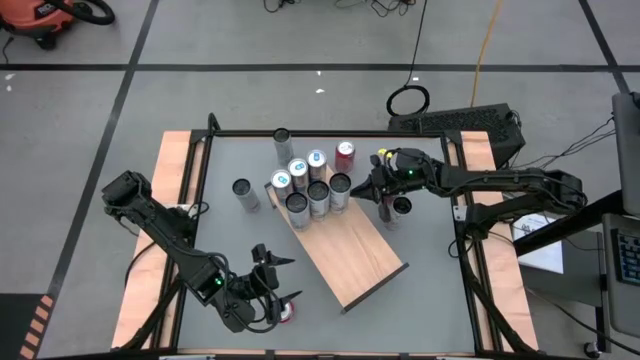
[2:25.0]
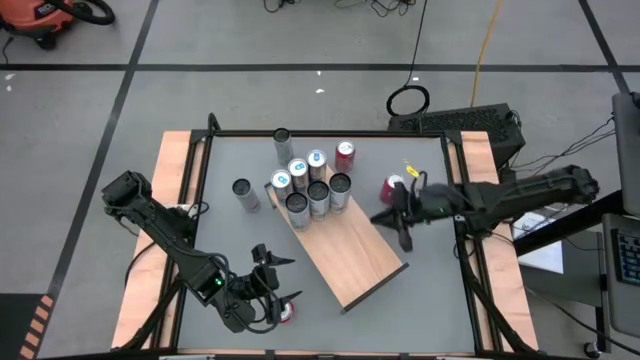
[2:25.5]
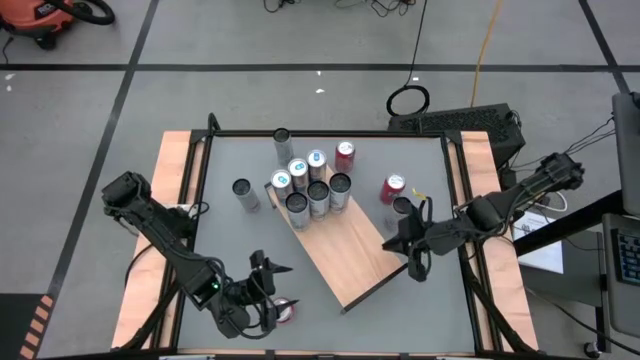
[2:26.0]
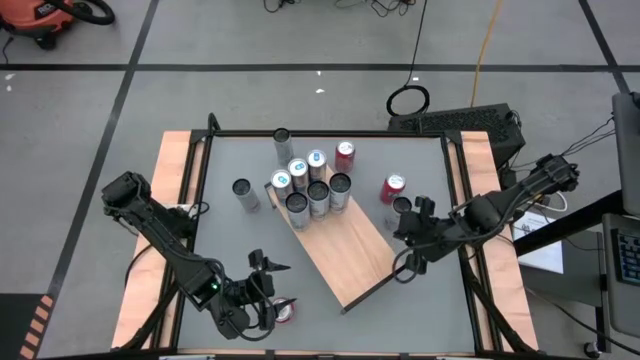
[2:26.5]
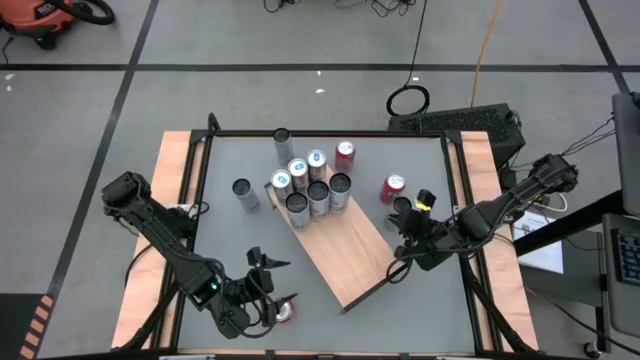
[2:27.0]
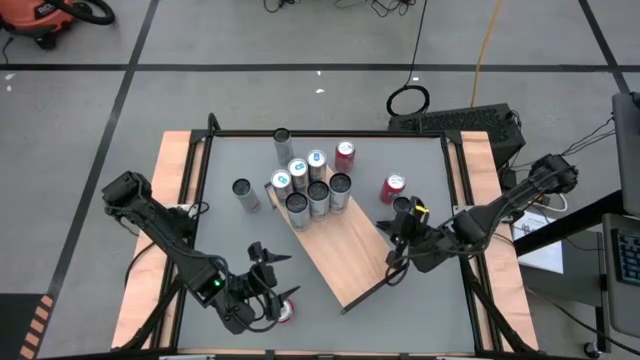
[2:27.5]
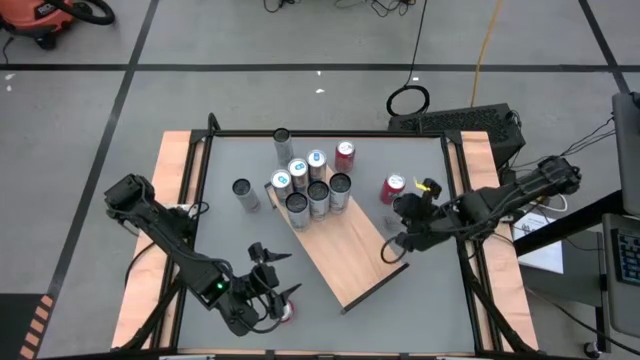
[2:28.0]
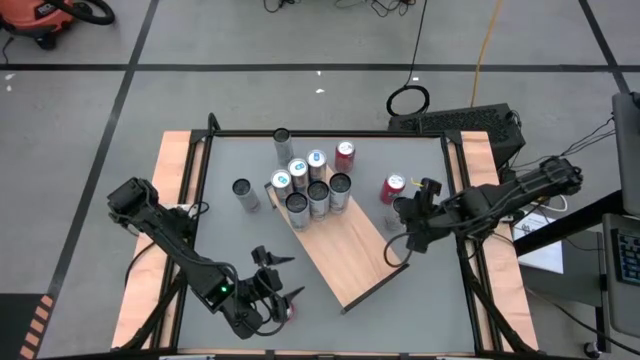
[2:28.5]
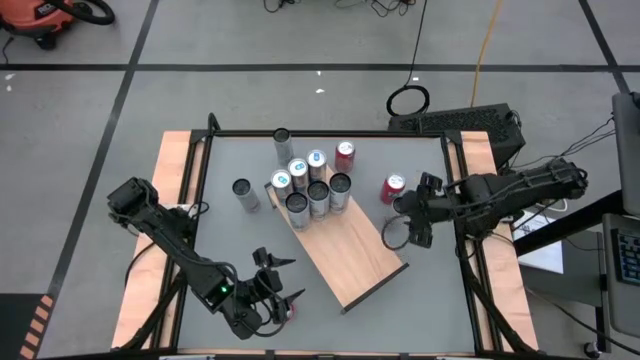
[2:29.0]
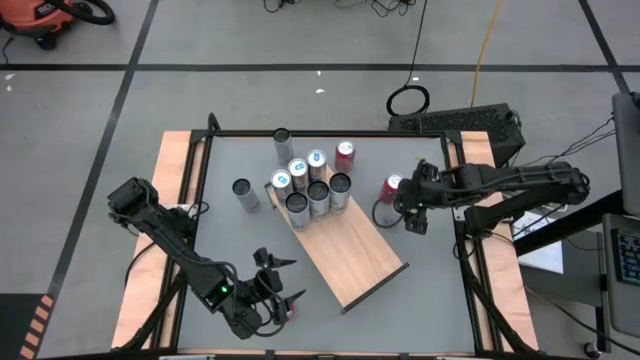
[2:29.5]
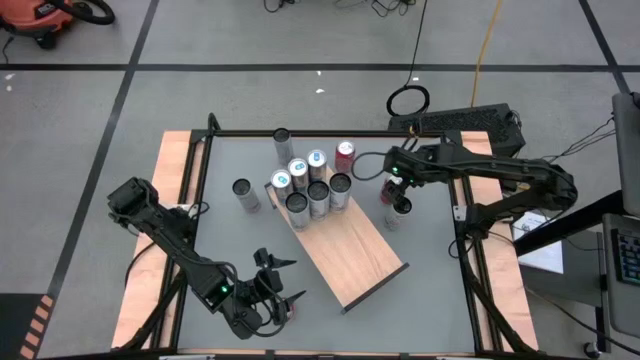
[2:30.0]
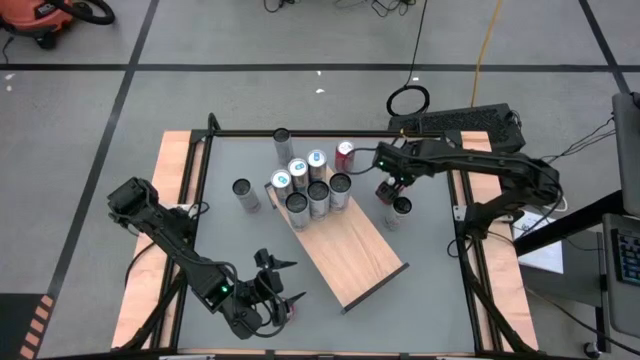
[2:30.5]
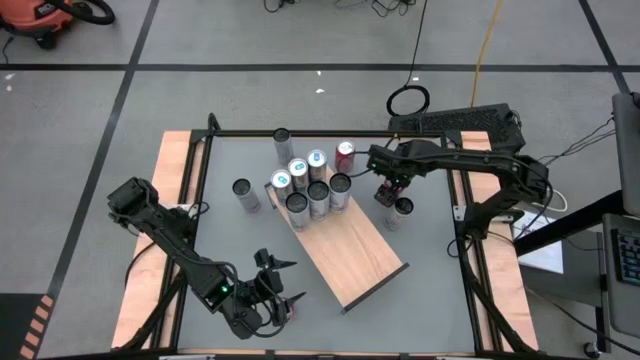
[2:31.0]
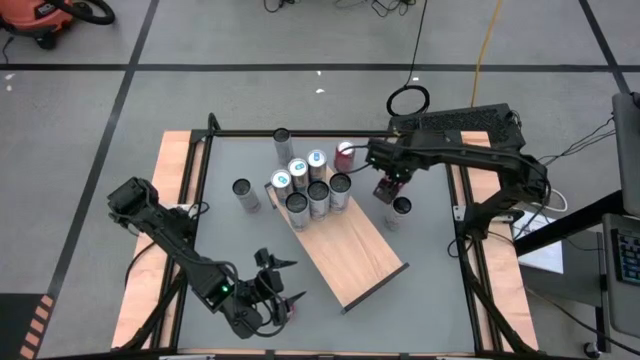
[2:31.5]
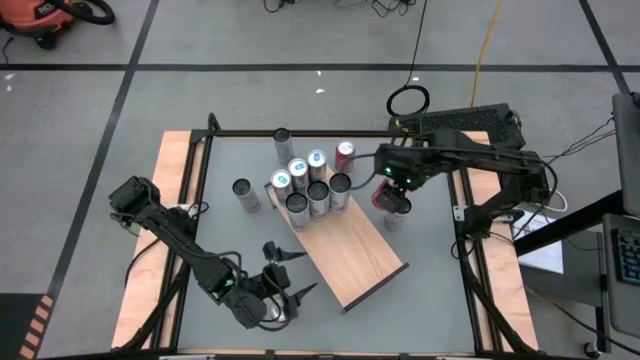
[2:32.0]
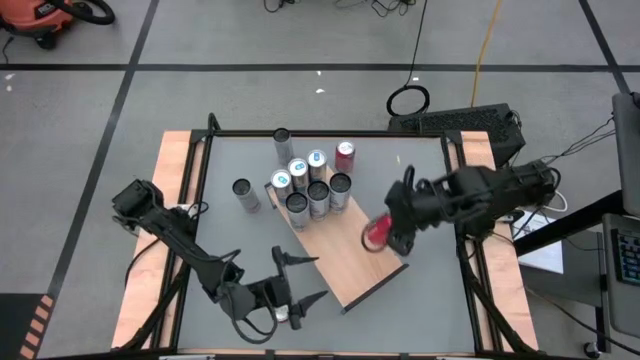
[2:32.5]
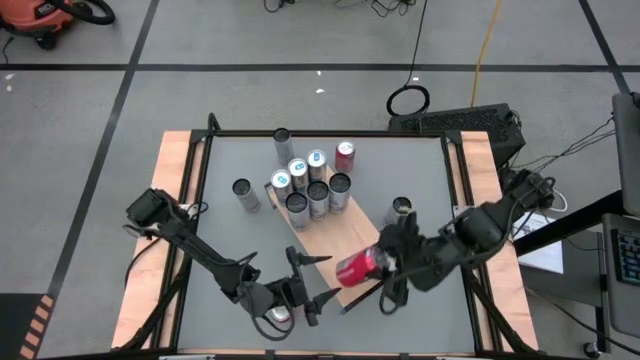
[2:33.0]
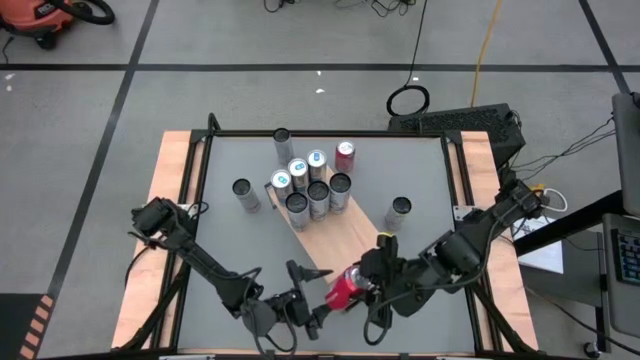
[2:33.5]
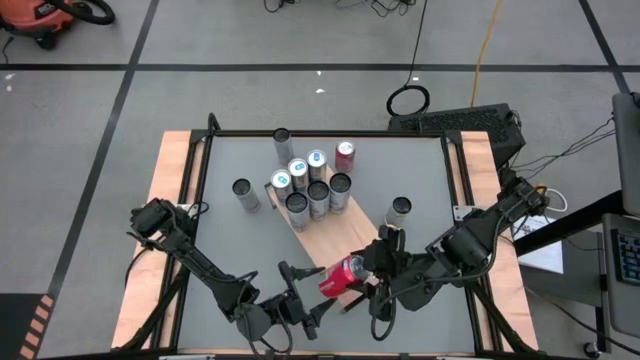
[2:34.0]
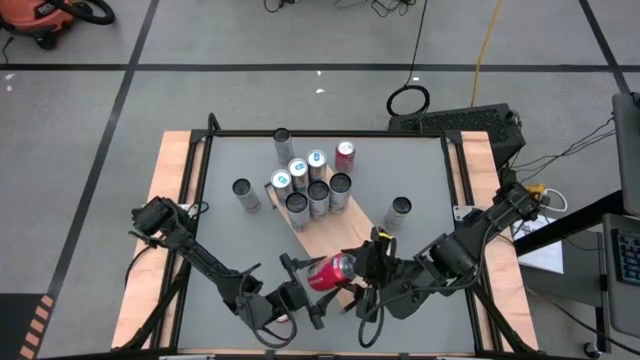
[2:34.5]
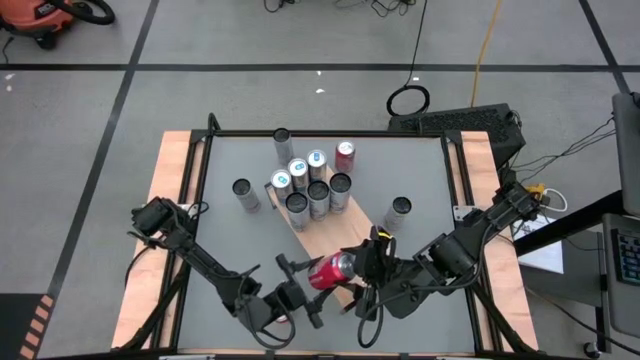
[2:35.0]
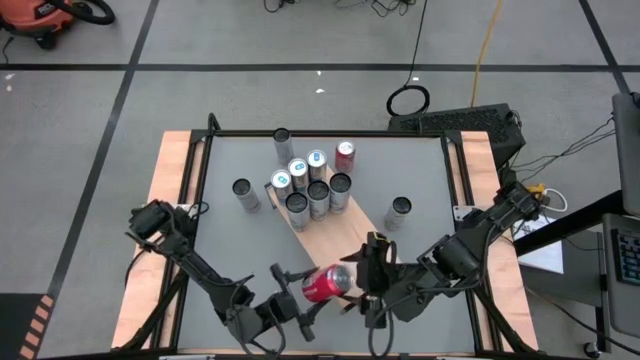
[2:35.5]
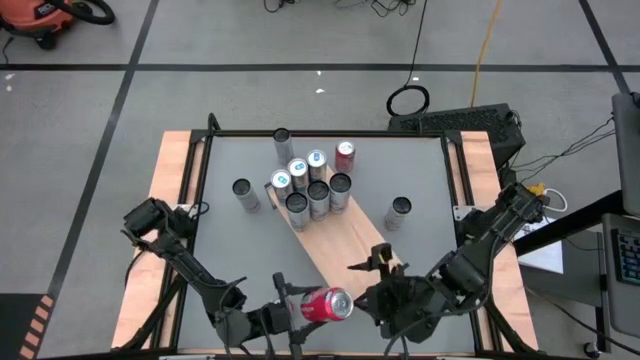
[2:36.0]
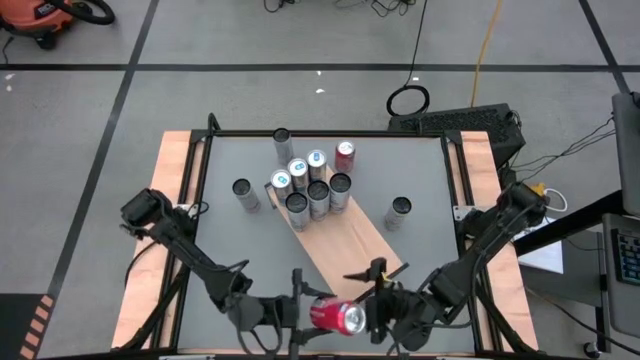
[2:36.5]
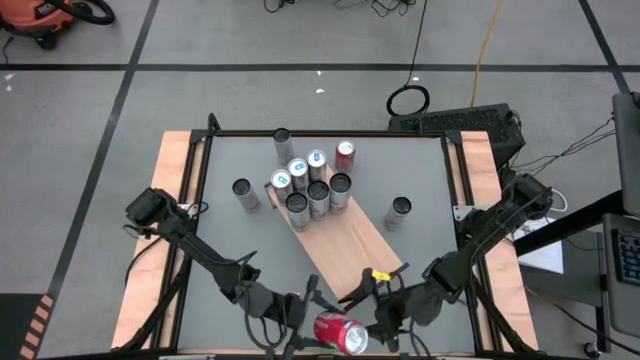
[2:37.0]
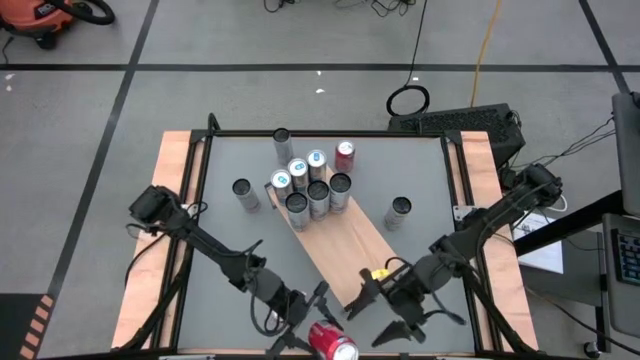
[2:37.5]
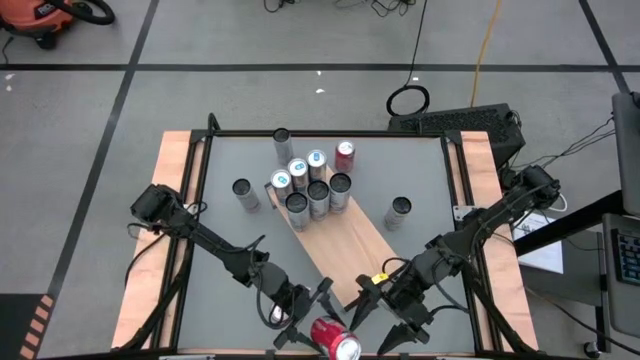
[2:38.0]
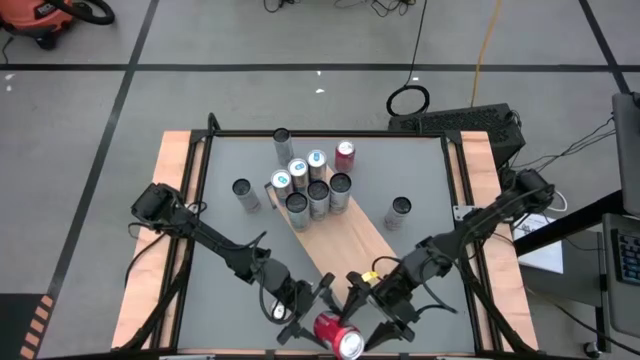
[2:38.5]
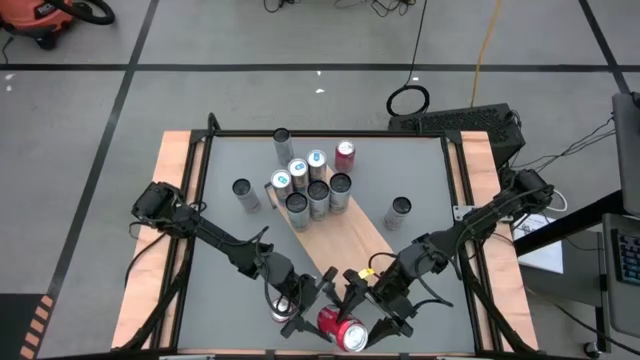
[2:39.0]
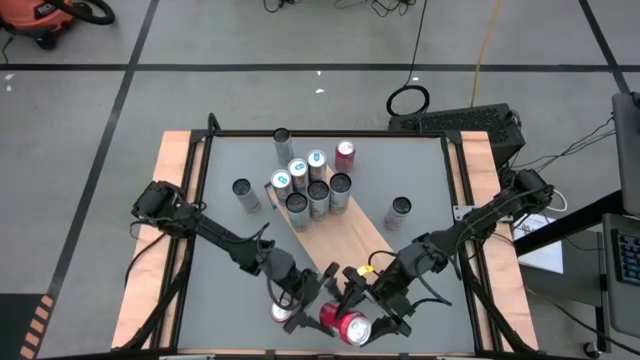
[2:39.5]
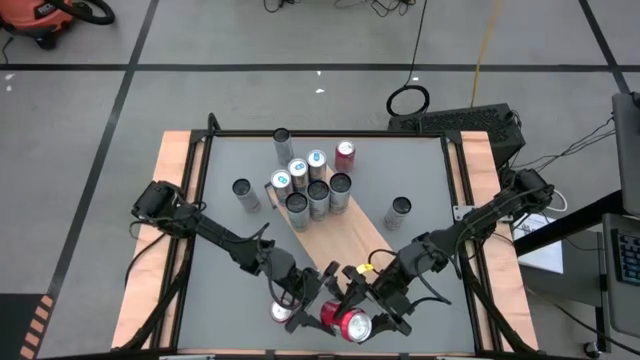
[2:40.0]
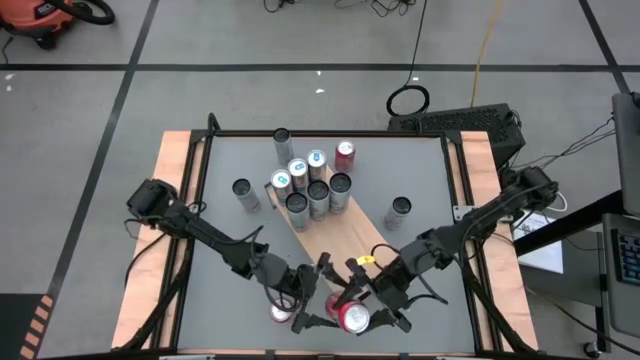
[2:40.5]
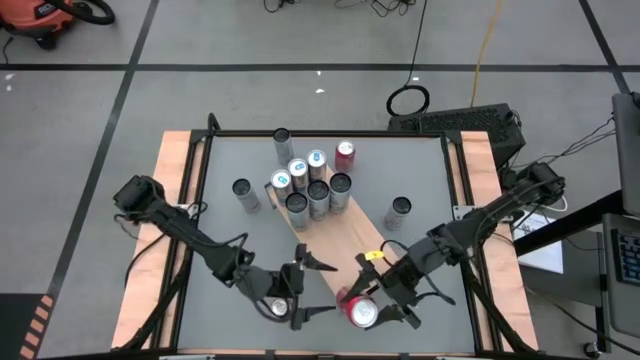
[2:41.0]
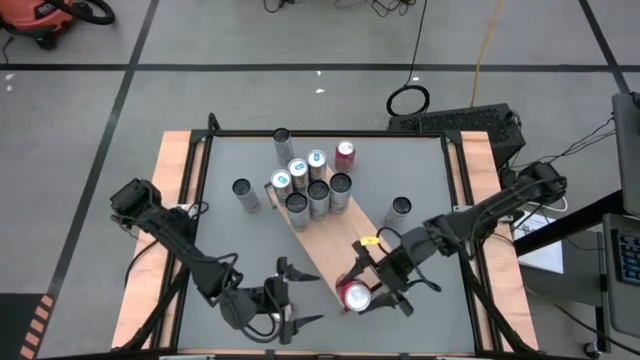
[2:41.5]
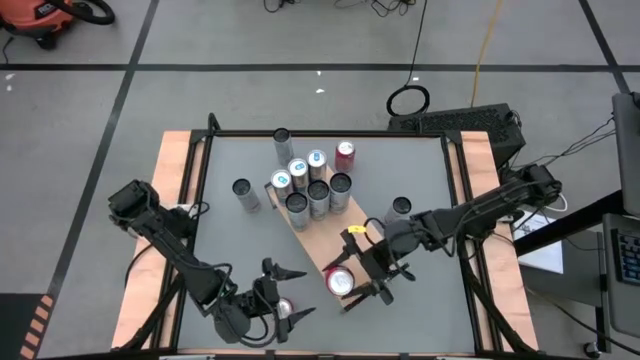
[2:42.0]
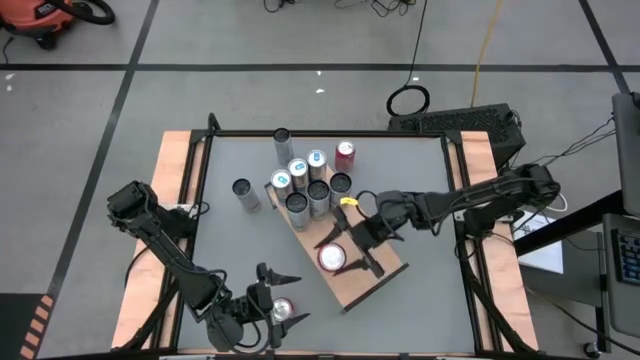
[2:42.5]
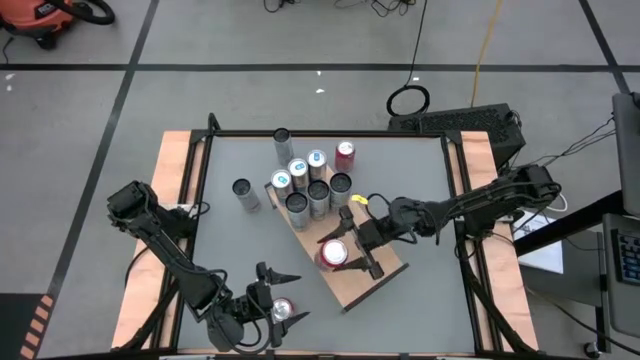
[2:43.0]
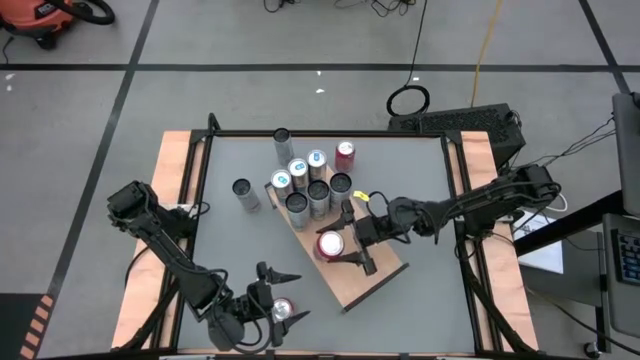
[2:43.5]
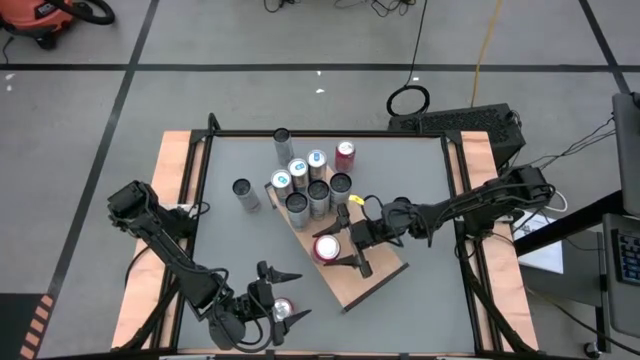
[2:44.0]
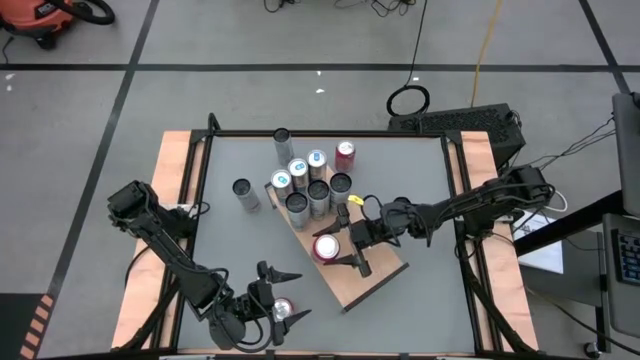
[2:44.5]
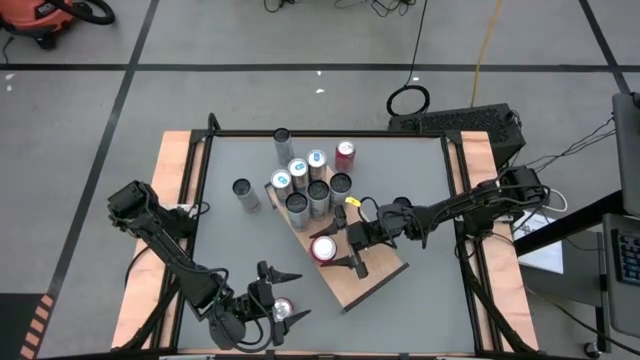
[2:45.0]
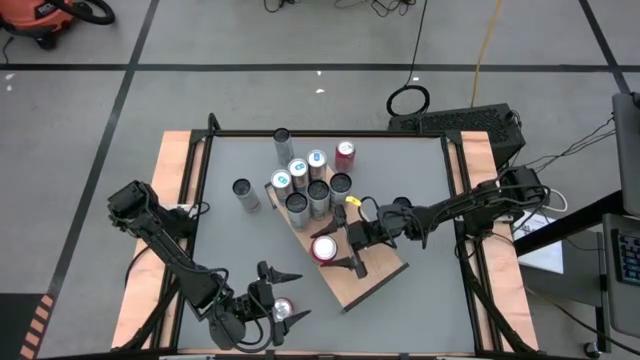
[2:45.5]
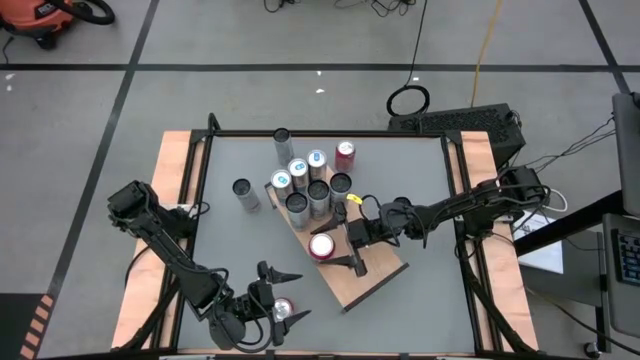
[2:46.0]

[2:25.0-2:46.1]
Task: Place canned beverage on shelf
Put the top right orange soda can on the shelf
